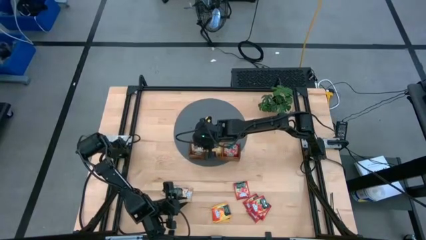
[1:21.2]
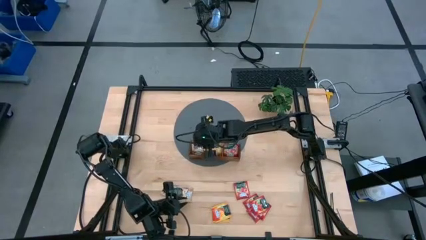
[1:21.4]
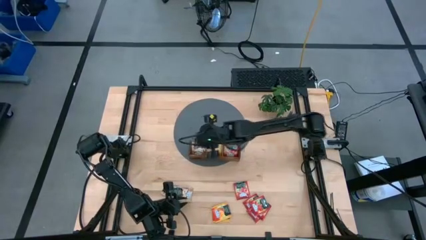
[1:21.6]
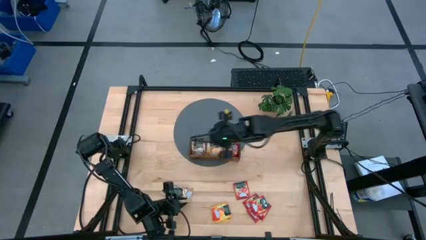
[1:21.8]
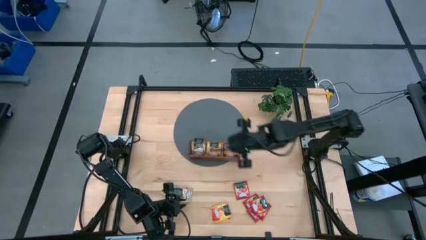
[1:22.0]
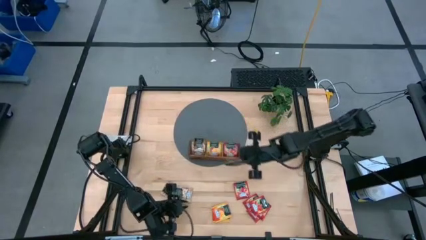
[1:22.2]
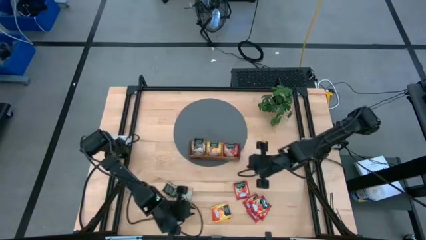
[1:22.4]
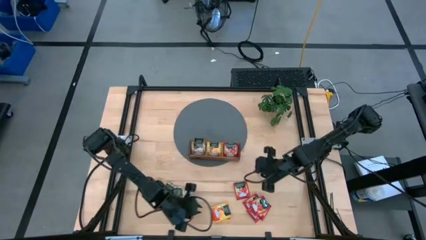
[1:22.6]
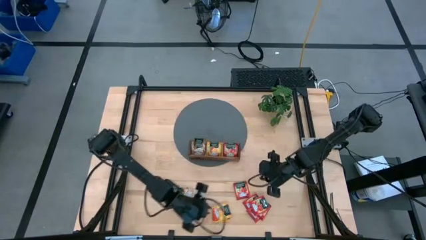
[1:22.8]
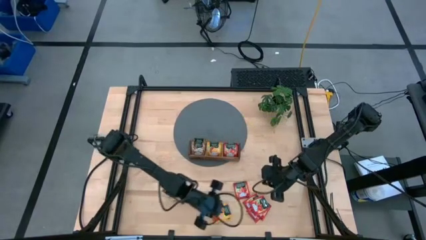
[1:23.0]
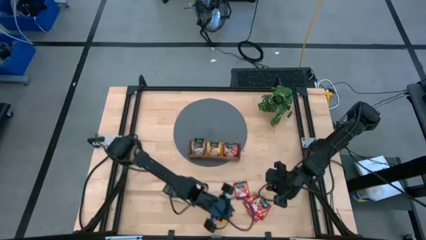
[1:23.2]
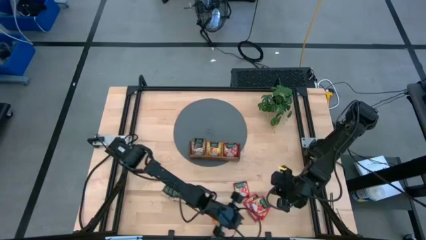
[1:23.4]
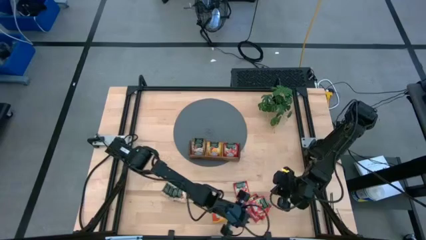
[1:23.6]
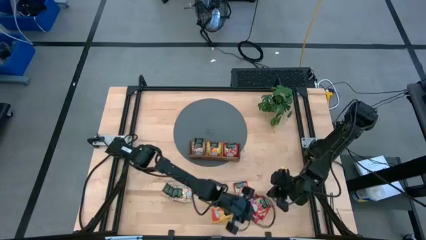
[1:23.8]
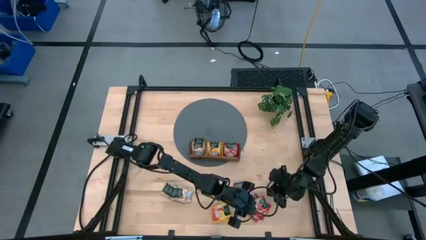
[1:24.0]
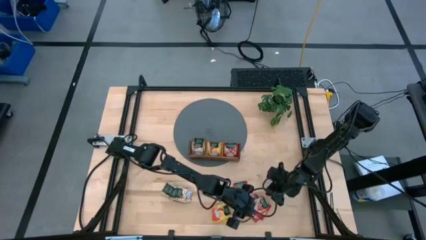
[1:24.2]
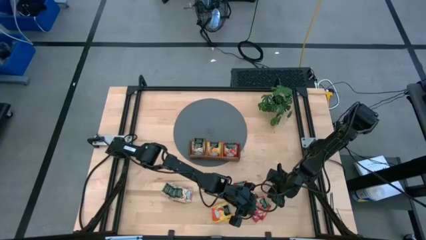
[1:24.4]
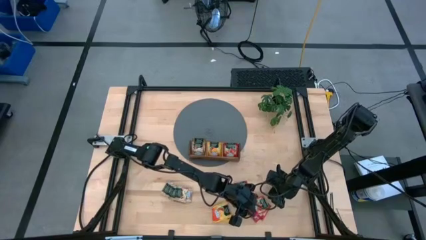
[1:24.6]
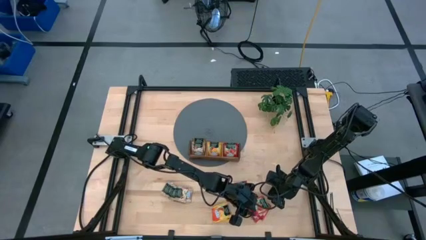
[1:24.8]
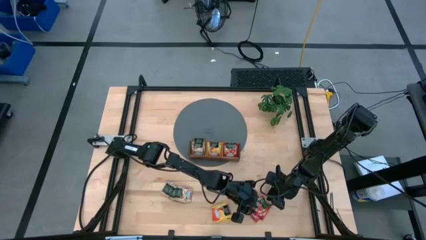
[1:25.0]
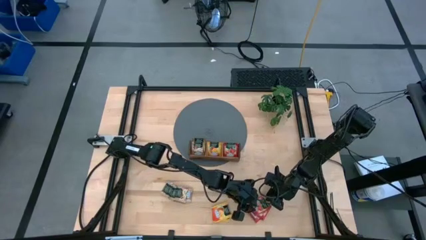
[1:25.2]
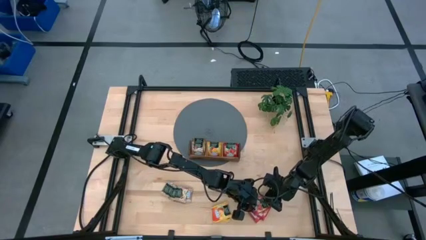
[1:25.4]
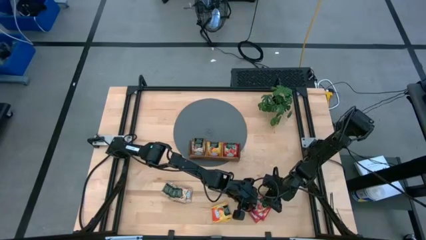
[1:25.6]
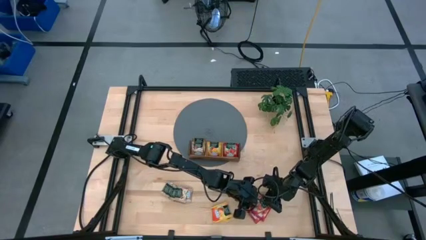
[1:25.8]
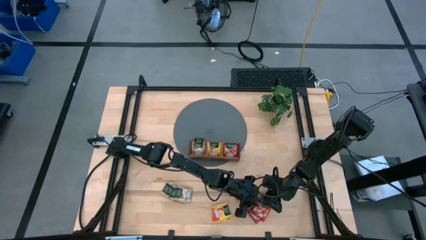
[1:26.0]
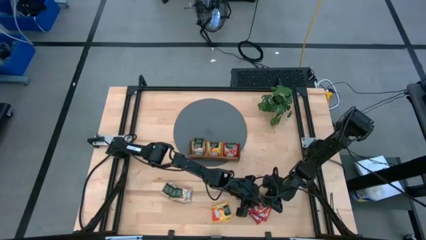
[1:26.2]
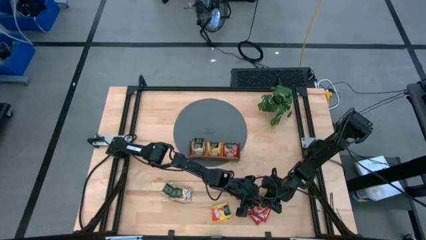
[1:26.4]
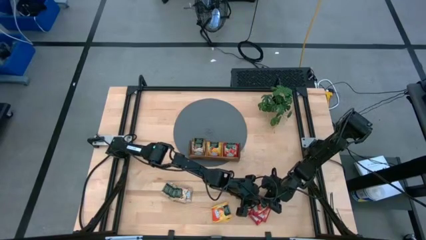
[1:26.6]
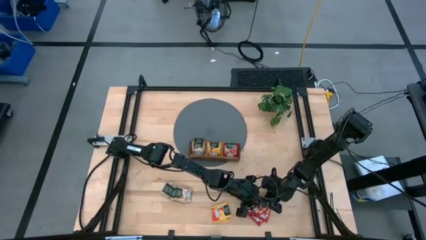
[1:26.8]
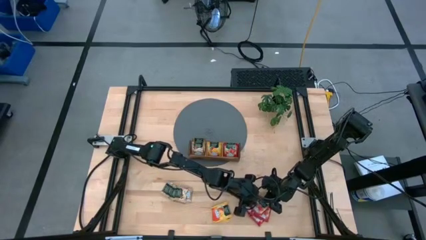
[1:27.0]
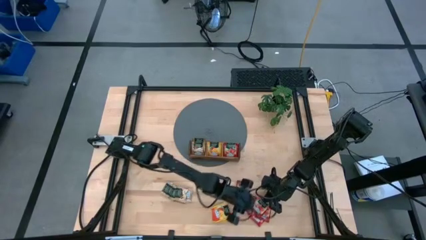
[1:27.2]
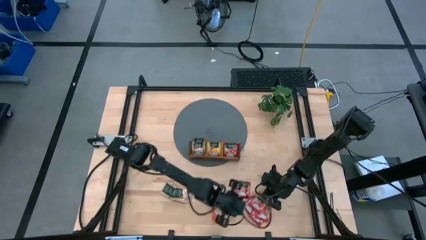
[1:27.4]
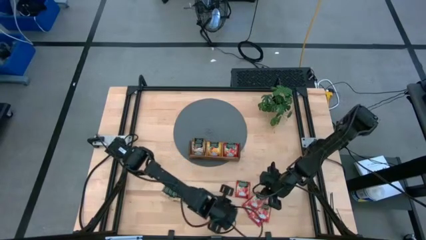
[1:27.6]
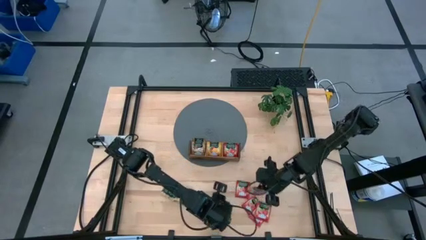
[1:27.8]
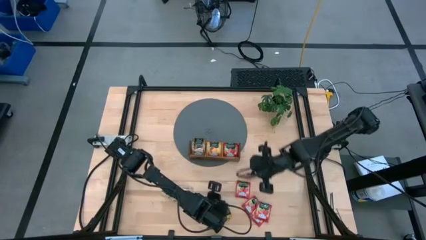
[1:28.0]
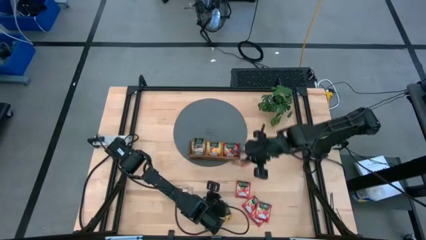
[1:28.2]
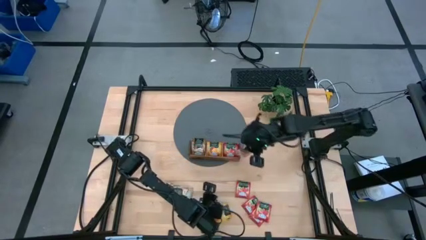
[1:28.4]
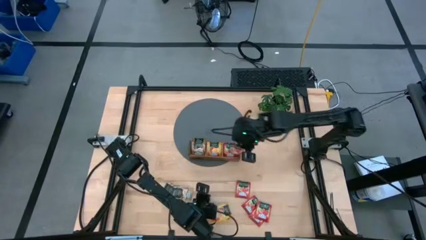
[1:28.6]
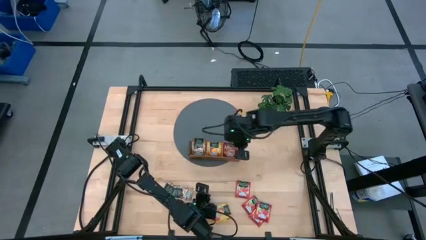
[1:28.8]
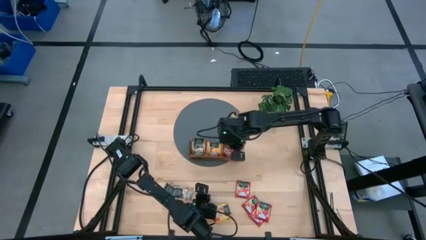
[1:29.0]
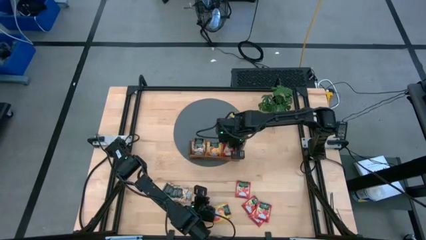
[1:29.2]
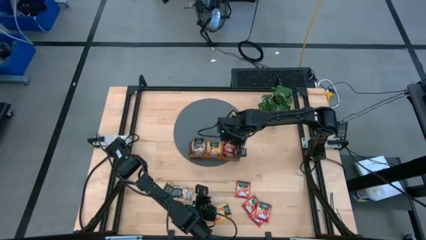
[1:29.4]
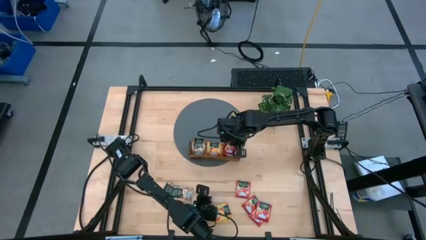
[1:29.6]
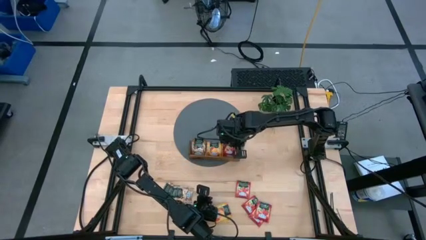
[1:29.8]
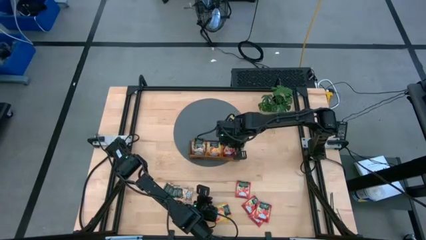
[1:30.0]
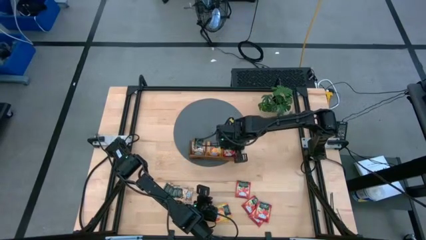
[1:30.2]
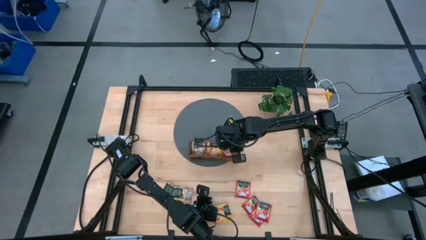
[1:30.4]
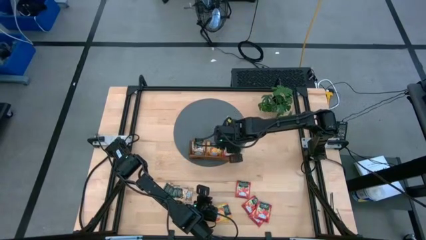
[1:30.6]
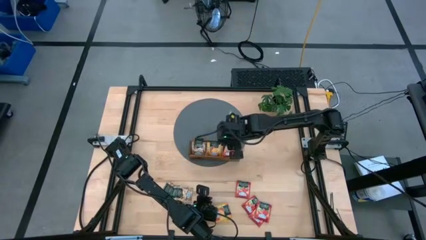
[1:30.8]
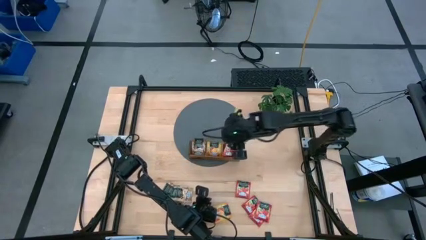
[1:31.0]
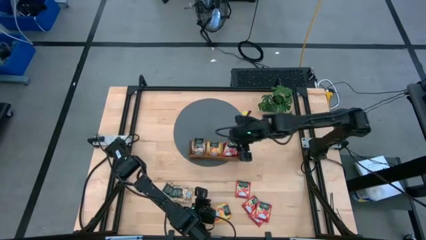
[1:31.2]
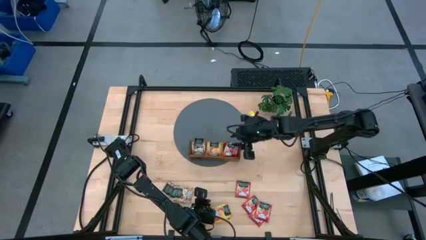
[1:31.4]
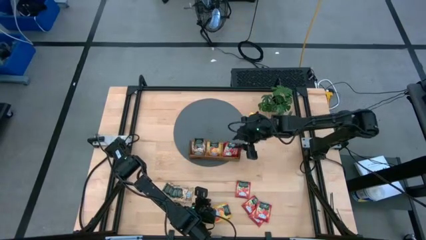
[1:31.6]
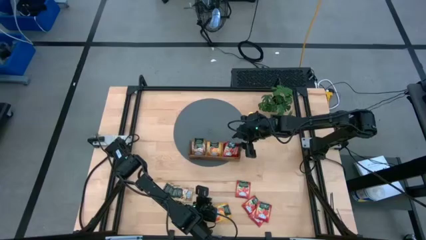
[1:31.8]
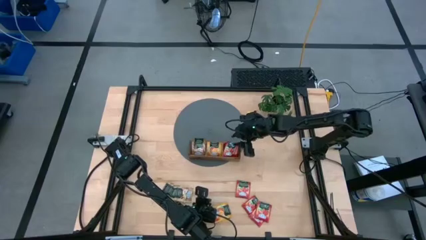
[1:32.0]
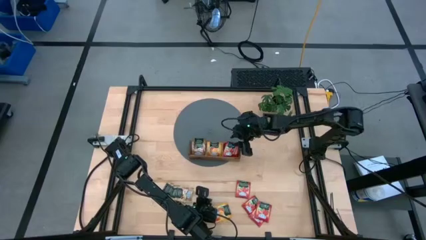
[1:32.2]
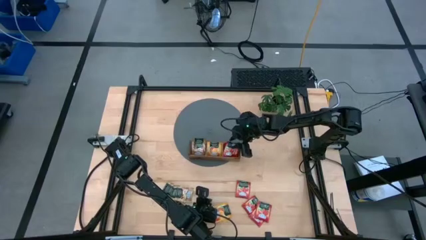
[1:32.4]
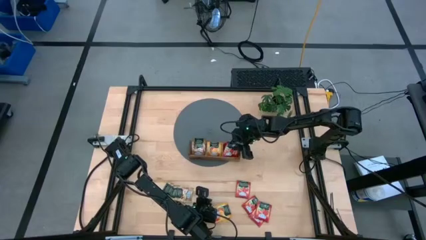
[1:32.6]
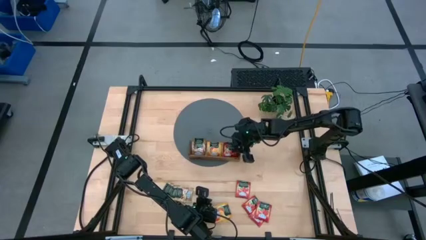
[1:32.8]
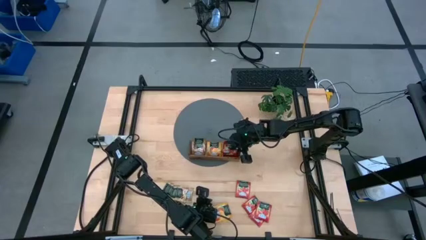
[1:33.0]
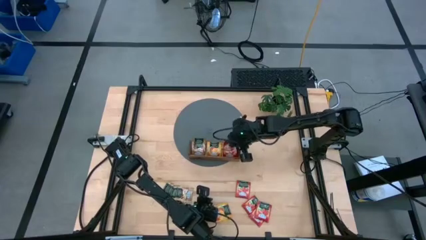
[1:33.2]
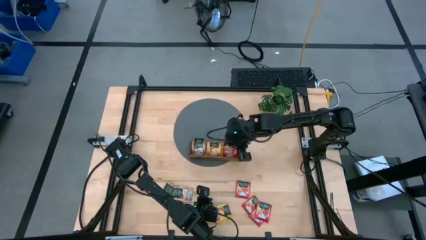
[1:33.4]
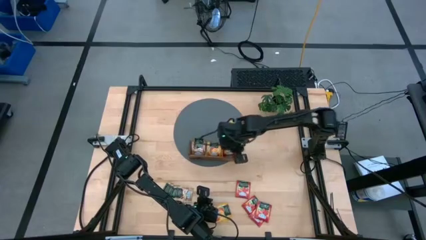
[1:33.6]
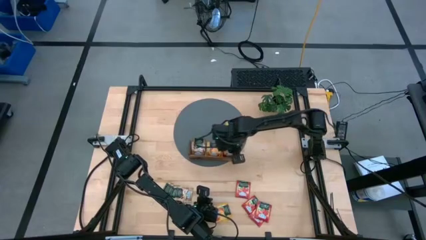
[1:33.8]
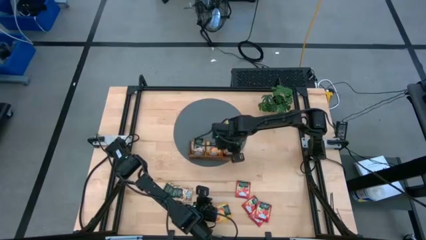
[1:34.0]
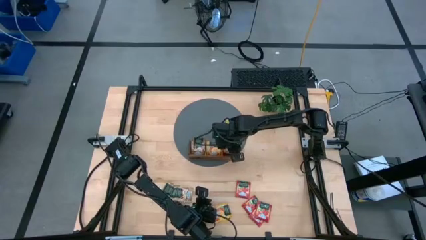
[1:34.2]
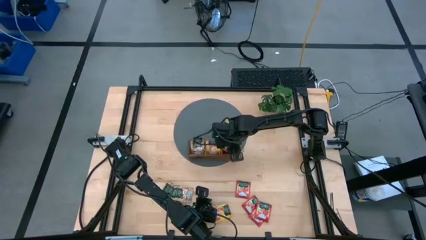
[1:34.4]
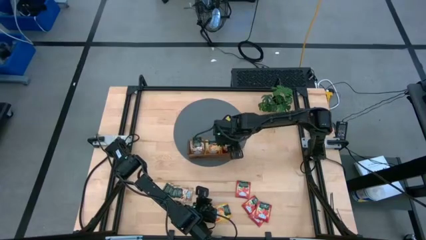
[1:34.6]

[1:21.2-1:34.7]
Task: Pick & Place Tea
Put the red tea bag into the right section of the wooden organizer

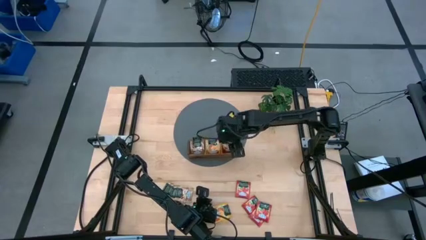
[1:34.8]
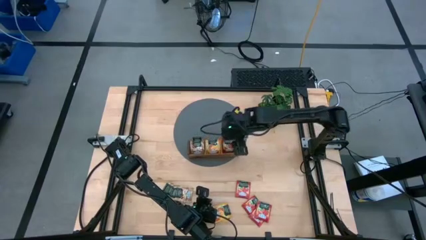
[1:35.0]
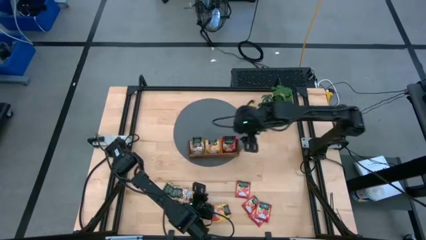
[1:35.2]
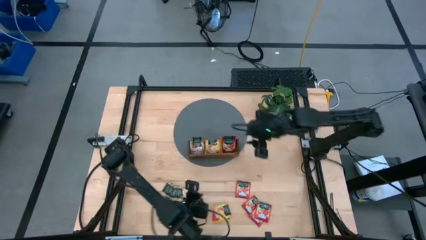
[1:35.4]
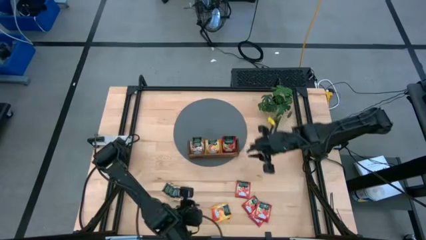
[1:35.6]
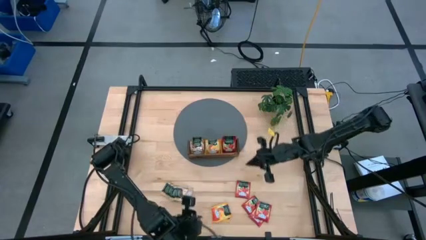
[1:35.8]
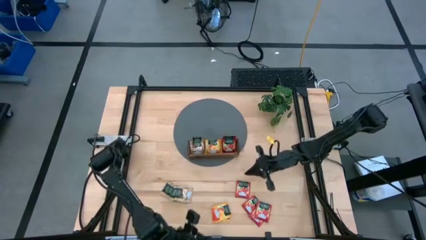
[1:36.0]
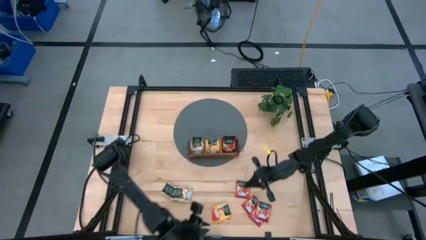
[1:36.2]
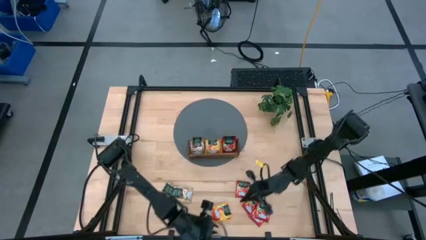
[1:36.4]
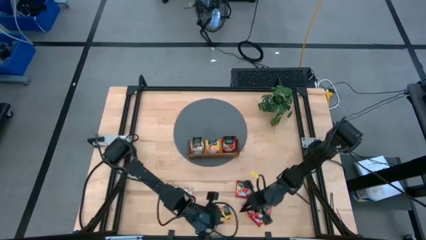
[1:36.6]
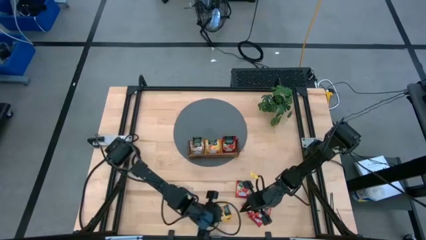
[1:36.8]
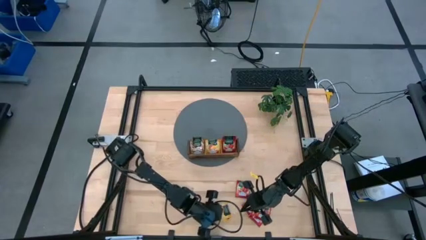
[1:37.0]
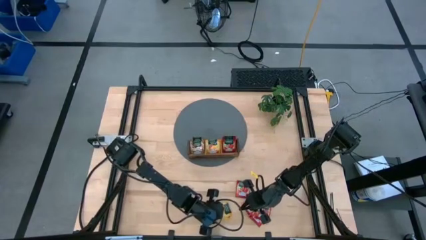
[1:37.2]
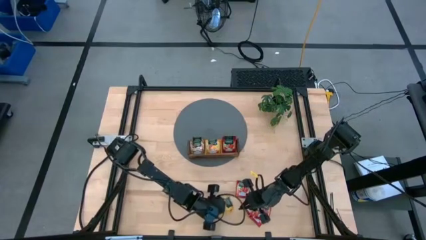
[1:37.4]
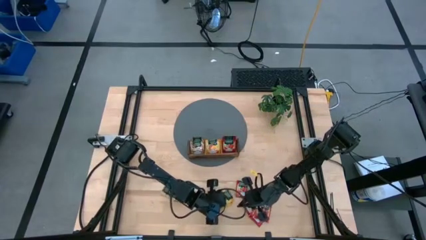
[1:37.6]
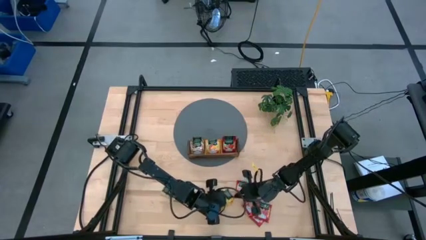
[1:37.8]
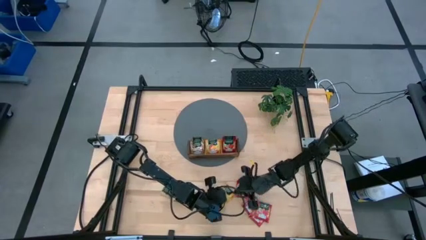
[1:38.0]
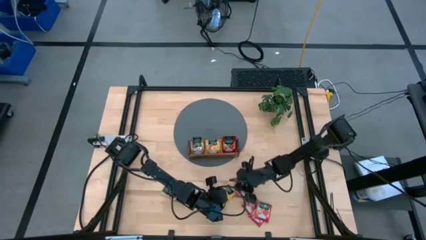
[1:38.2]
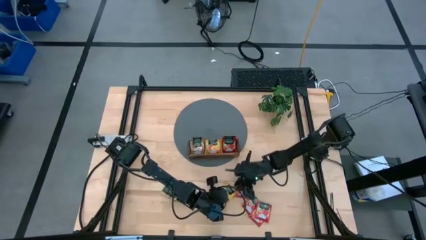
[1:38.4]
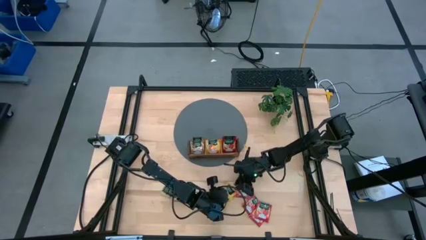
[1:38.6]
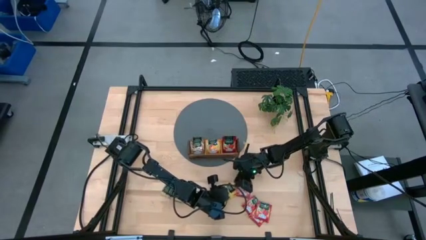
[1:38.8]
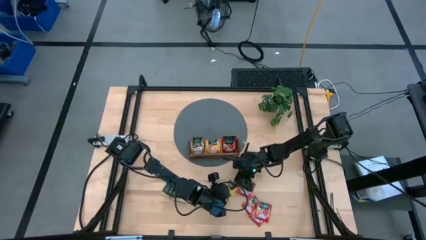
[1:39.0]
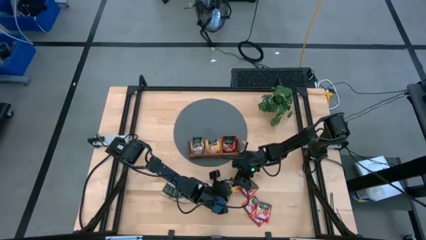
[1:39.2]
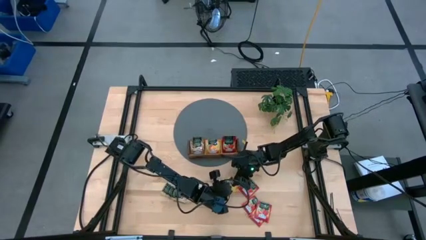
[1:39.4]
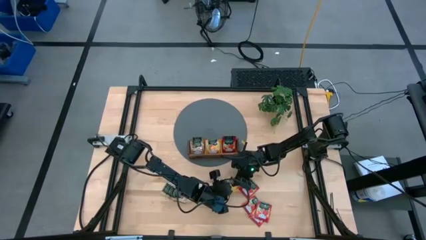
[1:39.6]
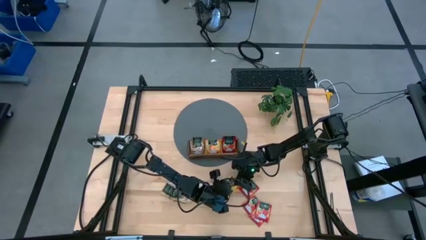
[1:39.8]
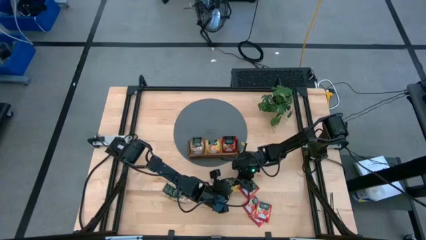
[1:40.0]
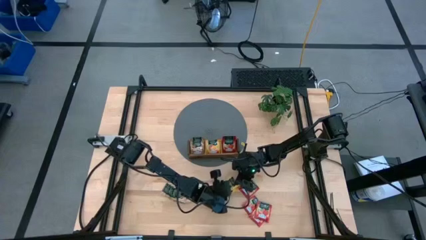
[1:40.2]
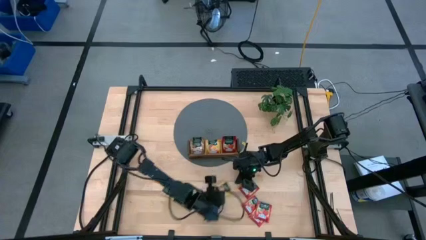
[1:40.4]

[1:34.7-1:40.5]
Put the yellow tea bag into the middle section of the wooden organizer
